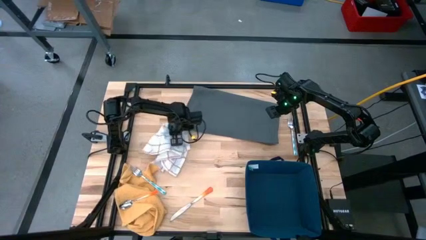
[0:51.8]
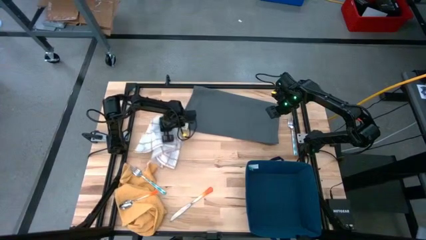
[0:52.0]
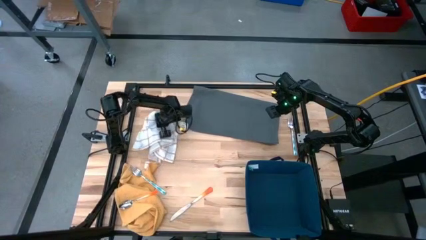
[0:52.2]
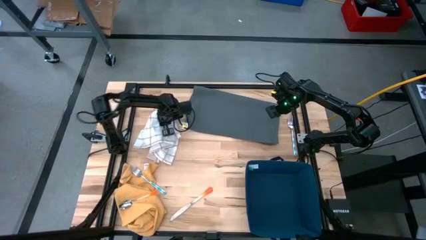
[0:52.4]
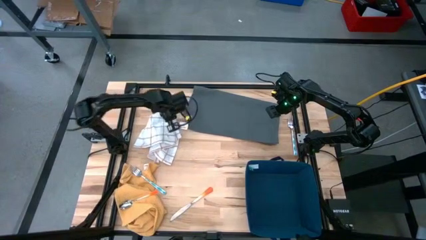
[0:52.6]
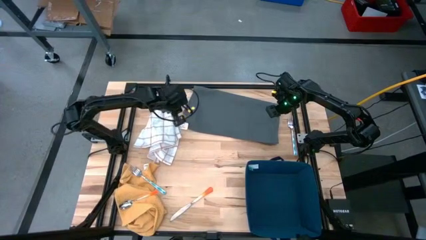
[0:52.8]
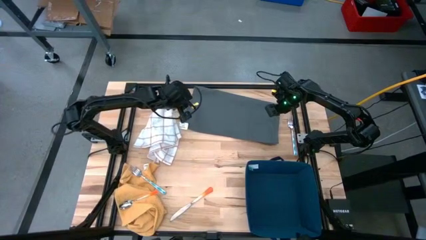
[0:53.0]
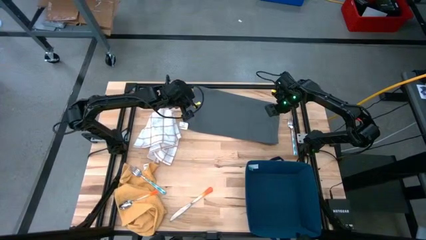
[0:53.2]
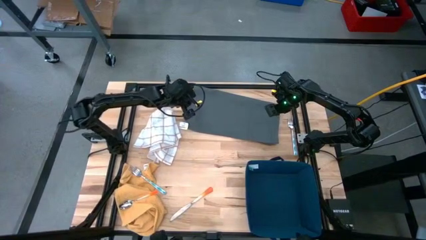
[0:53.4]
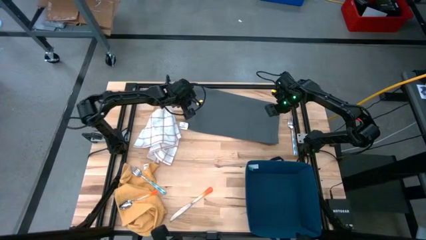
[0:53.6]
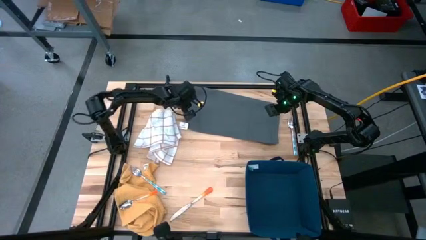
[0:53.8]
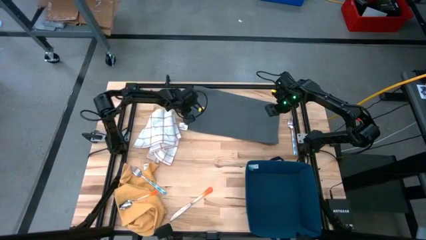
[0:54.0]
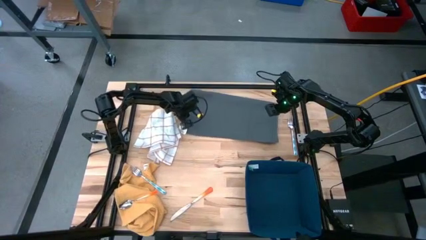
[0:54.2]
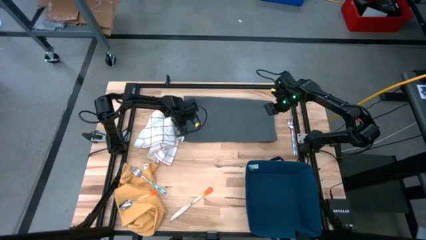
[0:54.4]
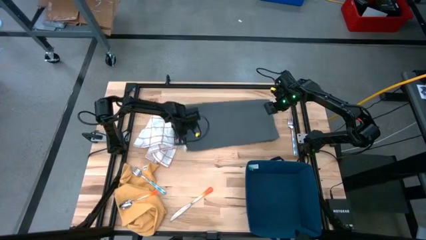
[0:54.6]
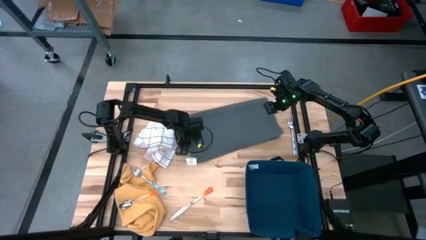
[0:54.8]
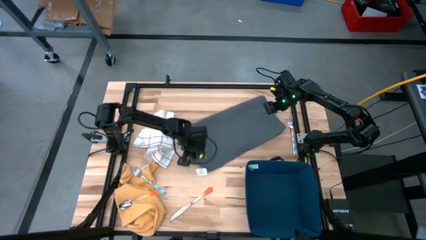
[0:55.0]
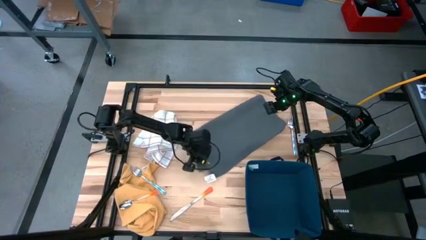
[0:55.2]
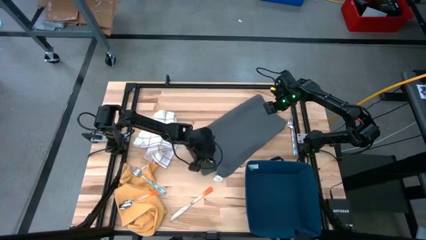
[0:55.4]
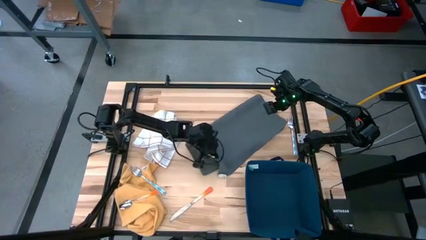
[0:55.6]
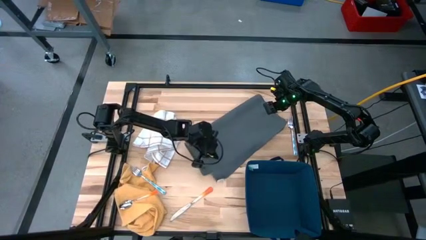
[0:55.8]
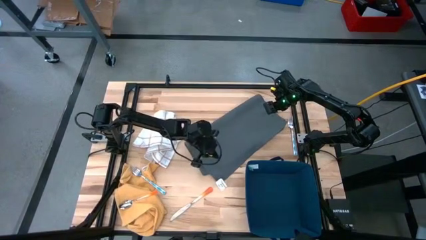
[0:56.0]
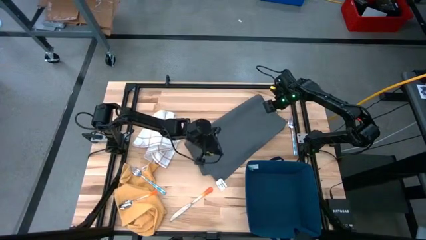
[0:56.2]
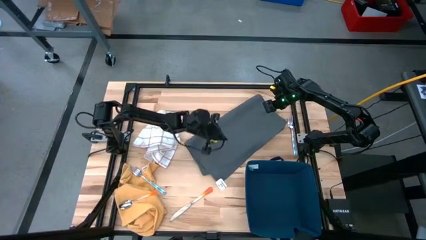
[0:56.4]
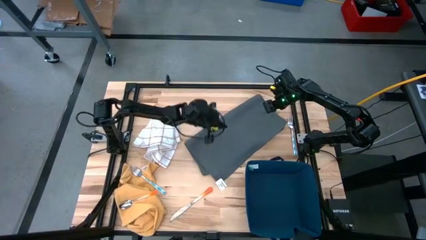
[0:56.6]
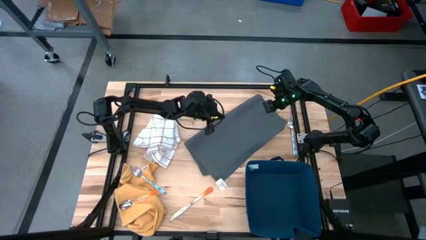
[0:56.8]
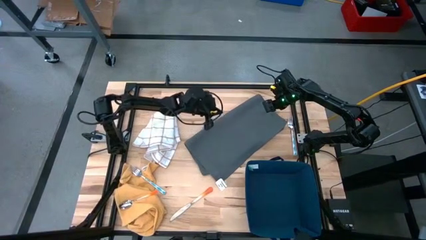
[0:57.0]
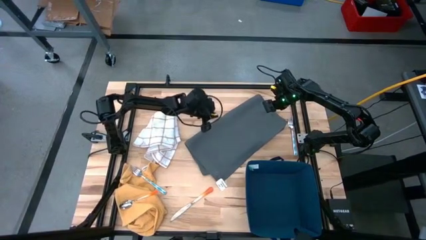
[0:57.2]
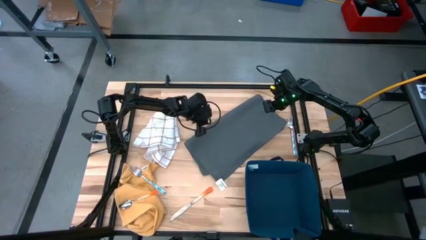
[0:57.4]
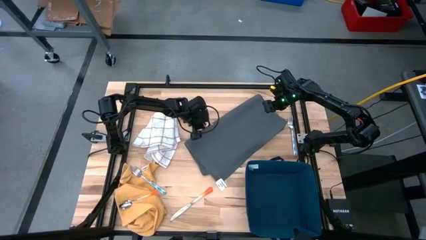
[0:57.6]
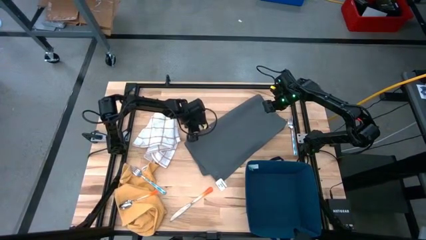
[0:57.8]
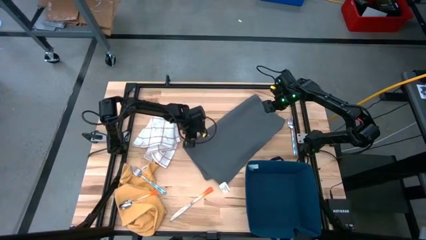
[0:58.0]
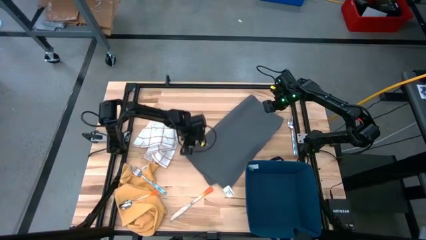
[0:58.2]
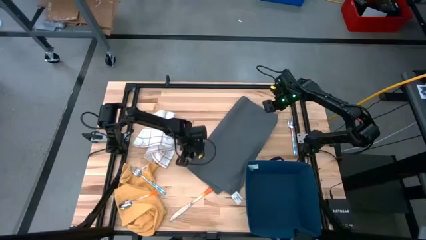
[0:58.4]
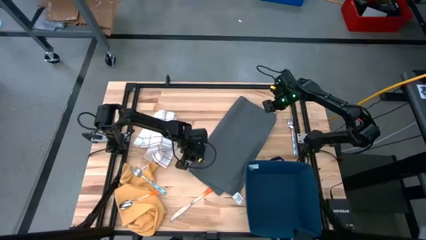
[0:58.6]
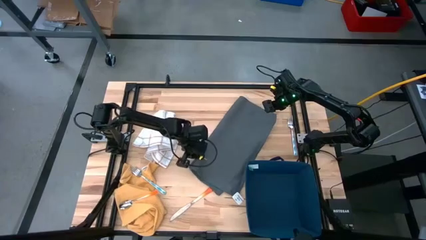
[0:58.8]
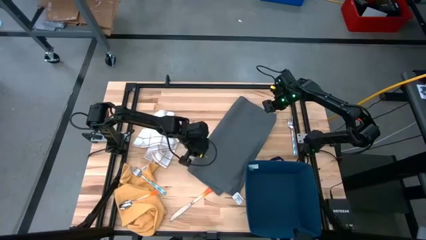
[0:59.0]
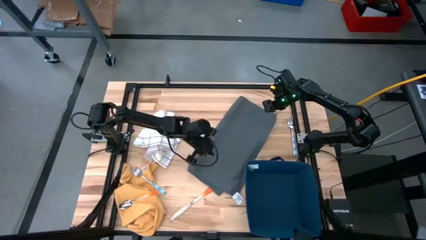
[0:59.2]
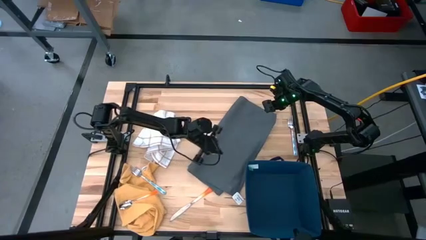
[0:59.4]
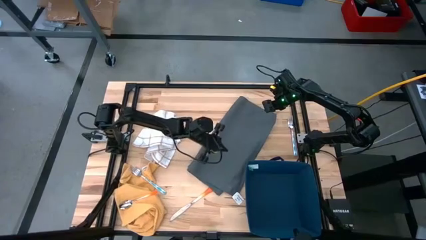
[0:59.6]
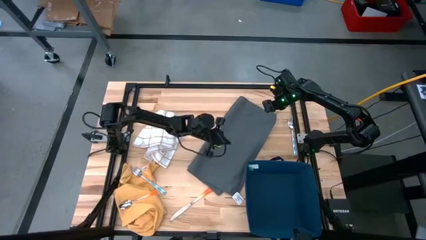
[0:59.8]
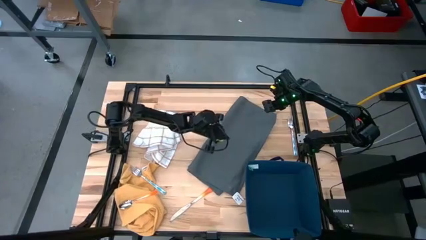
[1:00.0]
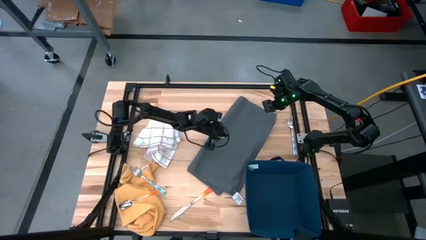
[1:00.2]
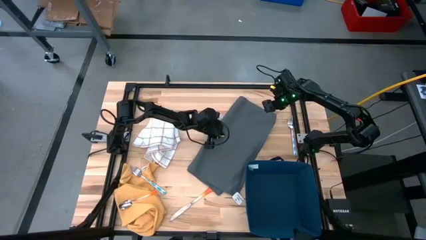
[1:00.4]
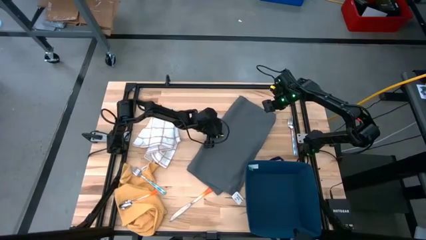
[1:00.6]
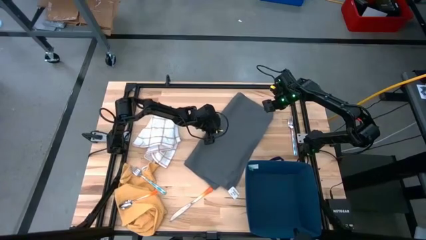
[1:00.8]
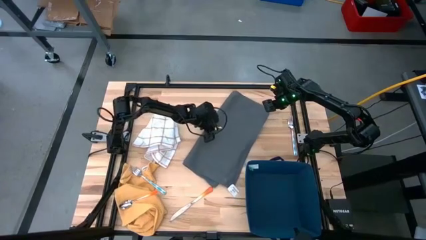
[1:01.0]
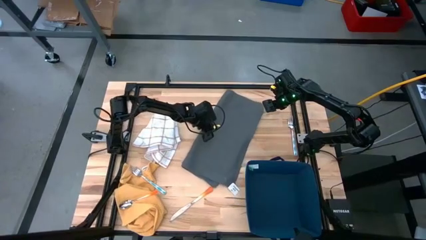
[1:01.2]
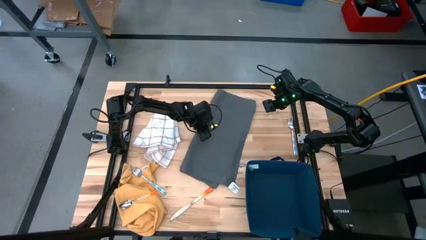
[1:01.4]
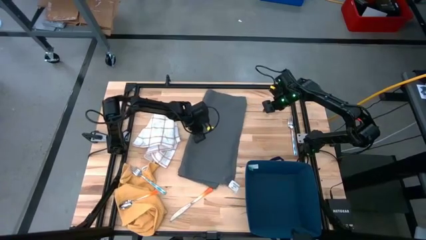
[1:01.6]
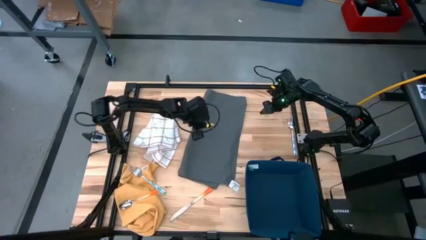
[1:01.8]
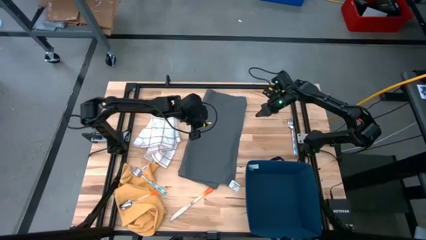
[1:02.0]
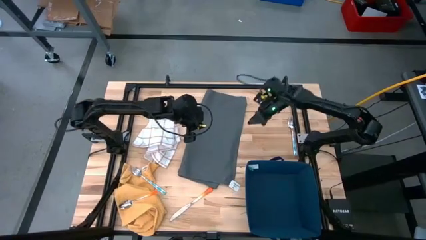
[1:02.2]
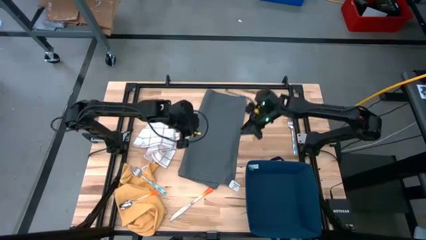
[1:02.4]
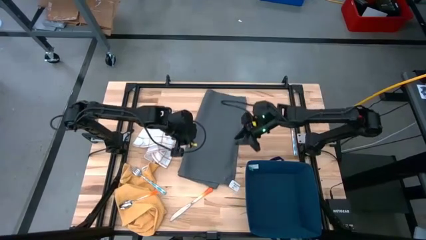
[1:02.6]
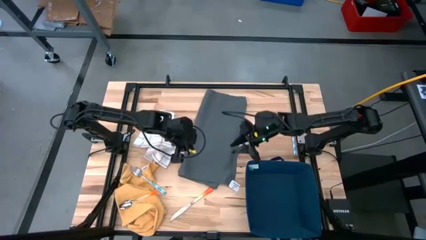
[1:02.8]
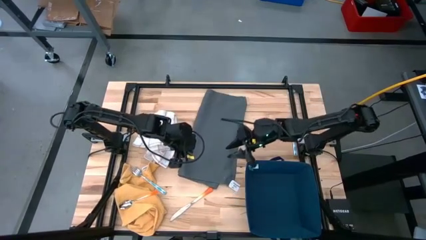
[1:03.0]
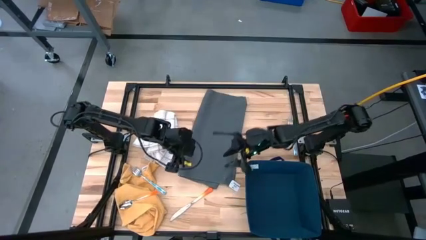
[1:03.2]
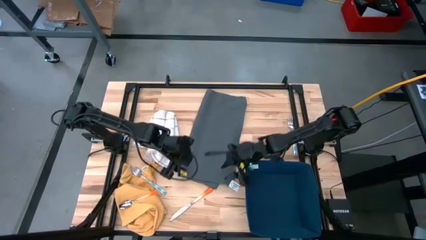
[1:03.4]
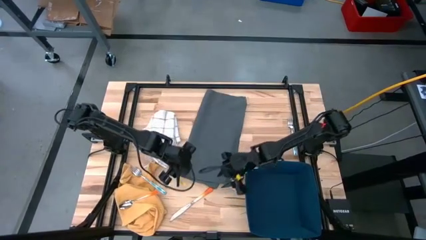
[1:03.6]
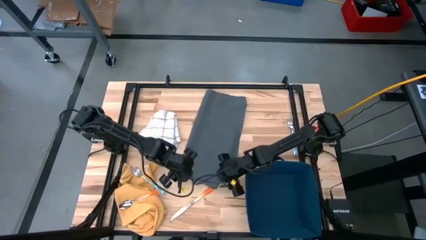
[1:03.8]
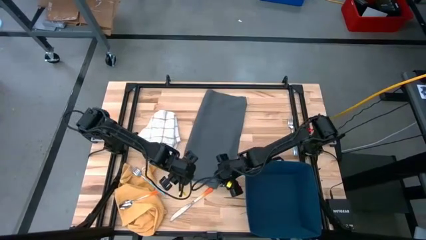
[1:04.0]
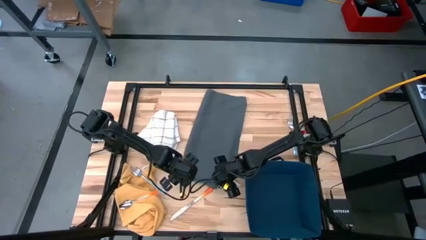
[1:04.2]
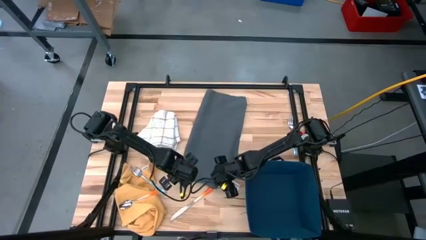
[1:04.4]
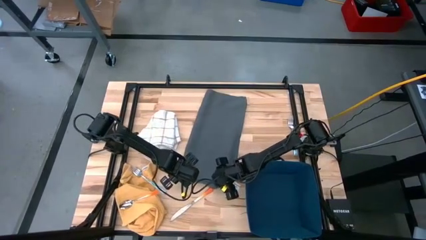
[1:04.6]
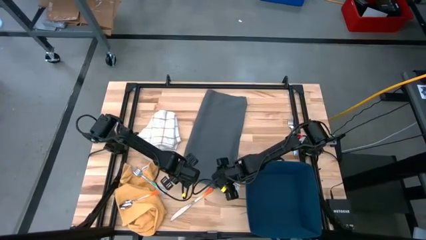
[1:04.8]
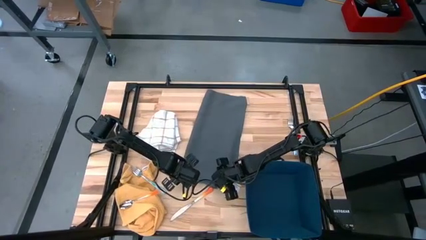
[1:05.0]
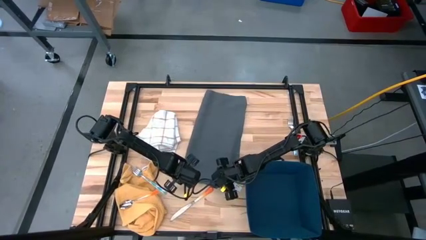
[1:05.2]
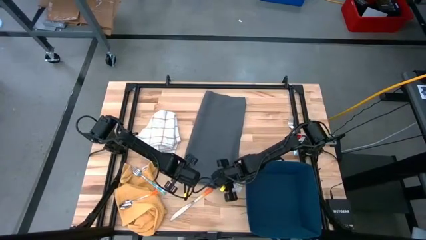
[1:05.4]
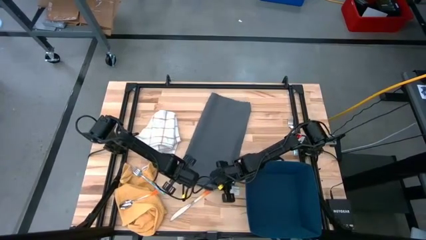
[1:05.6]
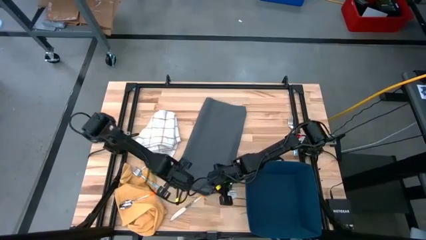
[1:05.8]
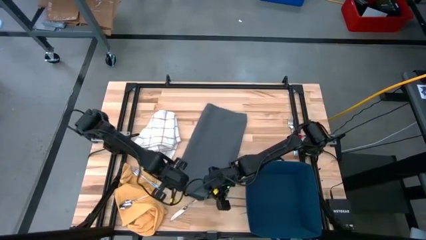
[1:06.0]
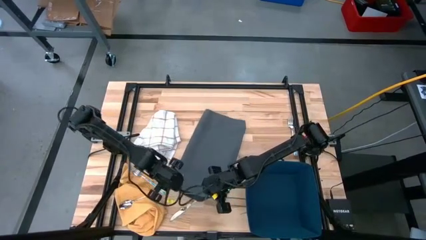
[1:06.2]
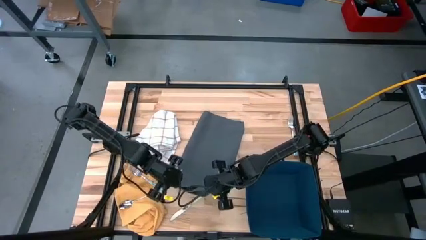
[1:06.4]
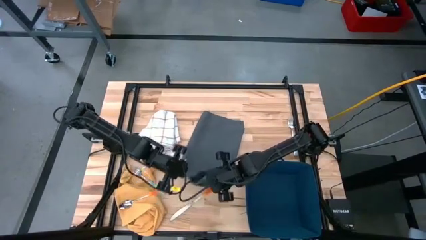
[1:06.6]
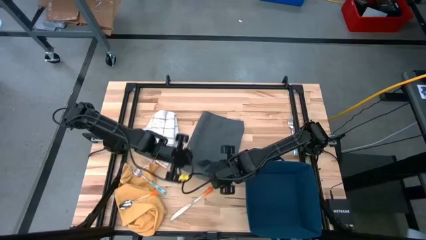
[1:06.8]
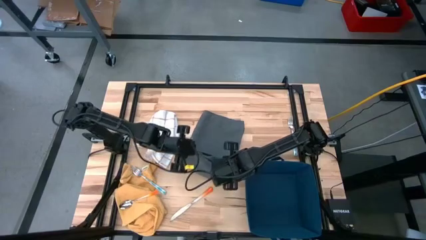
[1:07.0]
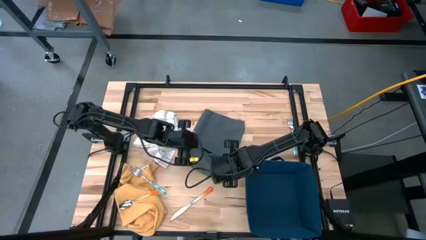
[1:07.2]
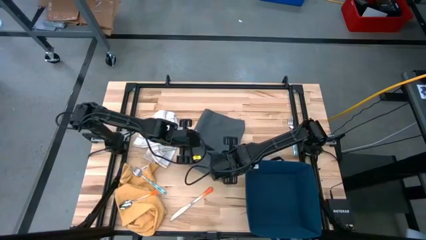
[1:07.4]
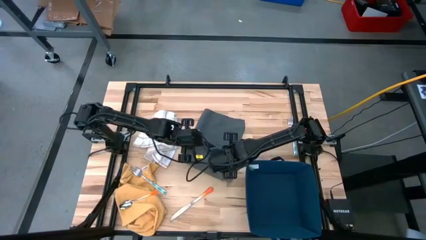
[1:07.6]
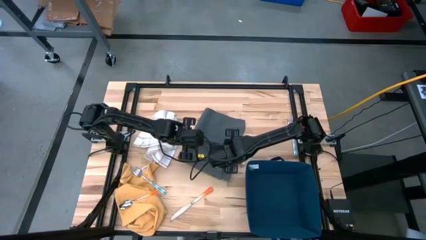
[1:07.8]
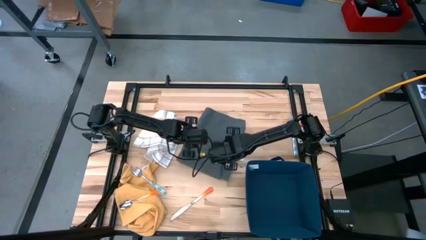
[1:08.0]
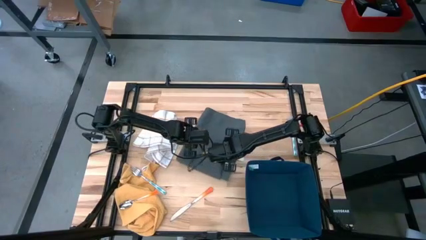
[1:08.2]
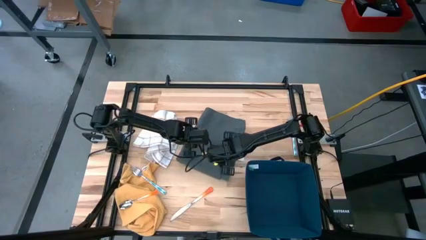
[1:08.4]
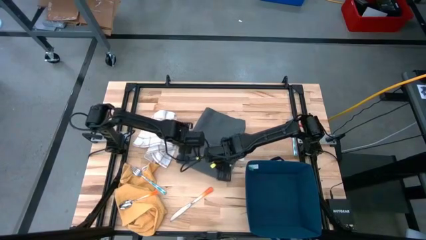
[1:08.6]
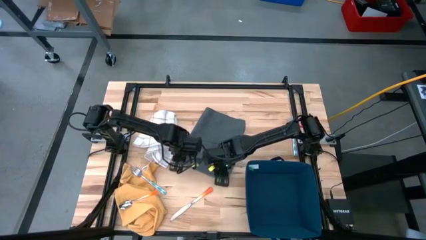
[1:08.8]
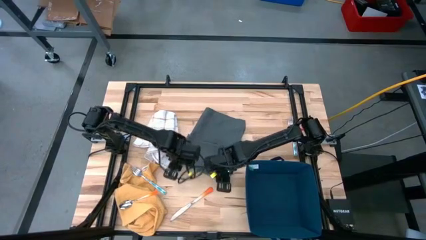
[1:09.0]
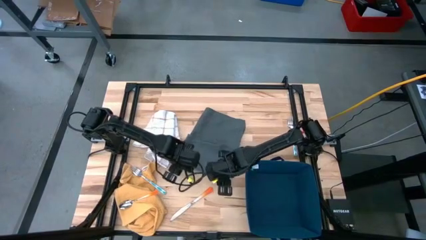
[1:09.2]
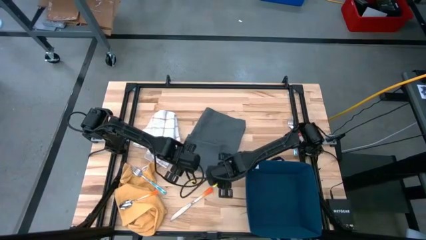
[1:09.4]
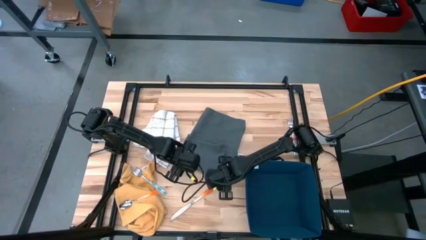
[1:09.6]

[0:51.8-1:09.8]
Task: Fold towel
Fold the grey towel
